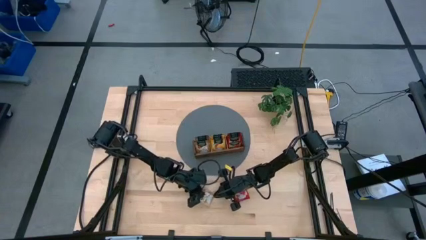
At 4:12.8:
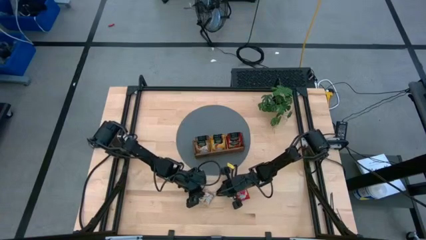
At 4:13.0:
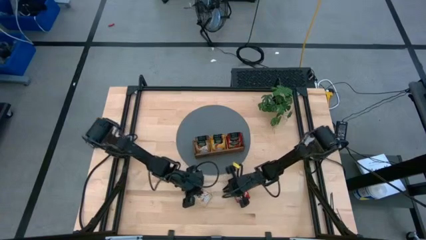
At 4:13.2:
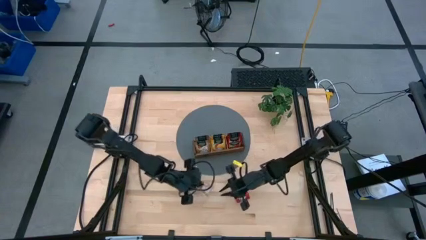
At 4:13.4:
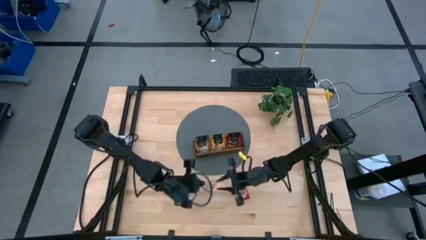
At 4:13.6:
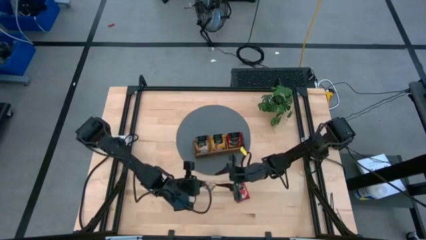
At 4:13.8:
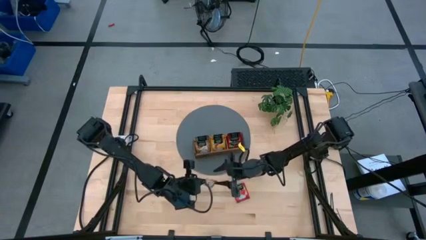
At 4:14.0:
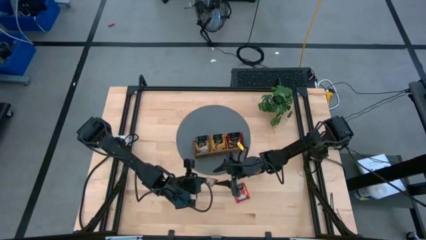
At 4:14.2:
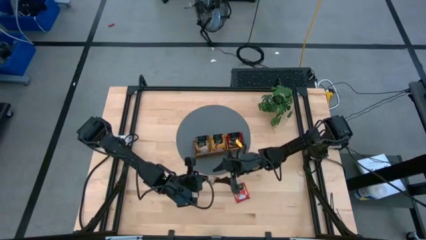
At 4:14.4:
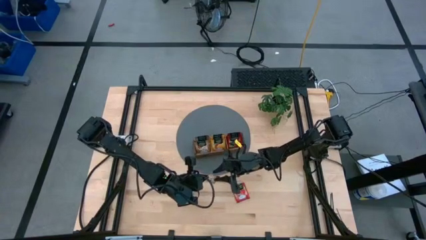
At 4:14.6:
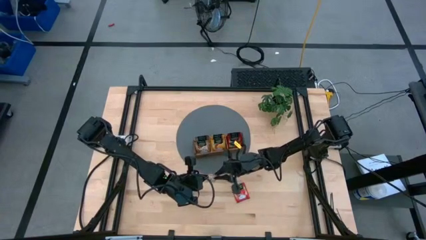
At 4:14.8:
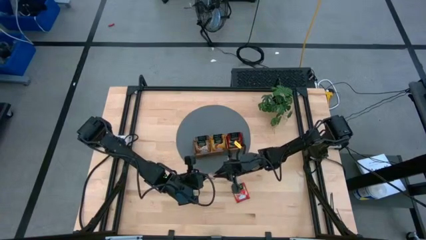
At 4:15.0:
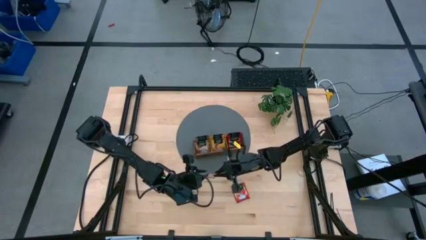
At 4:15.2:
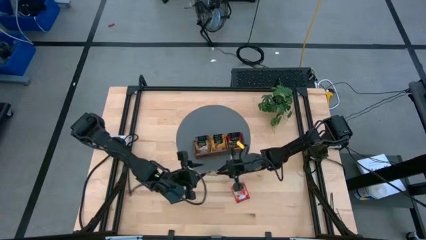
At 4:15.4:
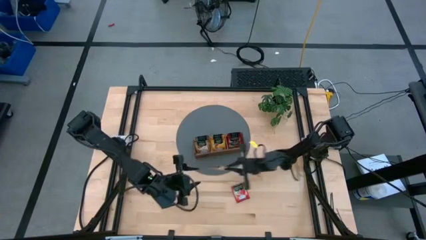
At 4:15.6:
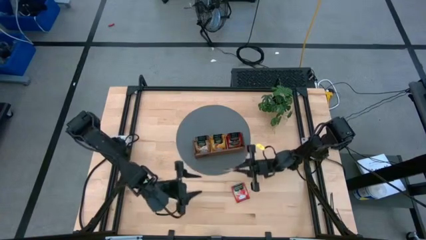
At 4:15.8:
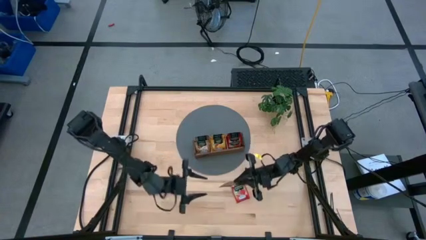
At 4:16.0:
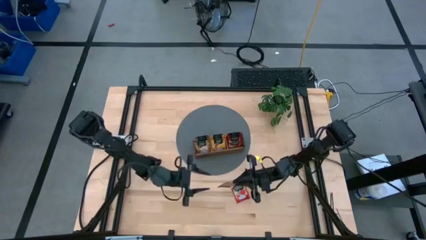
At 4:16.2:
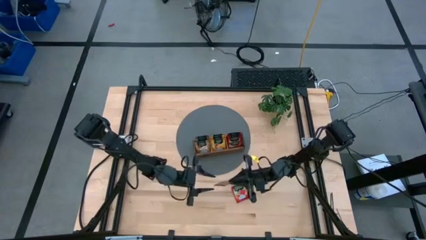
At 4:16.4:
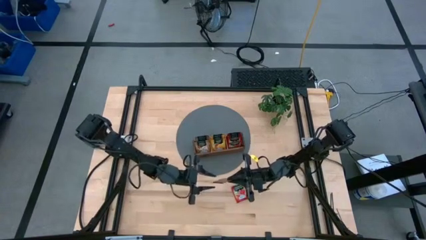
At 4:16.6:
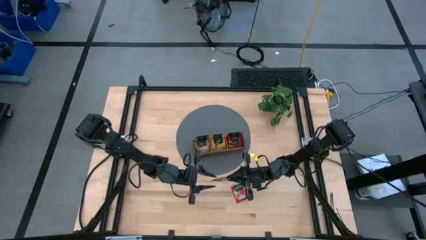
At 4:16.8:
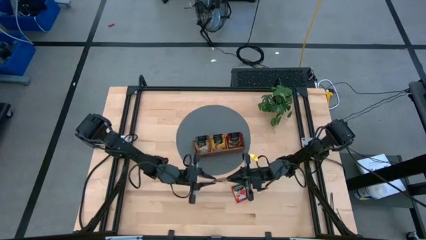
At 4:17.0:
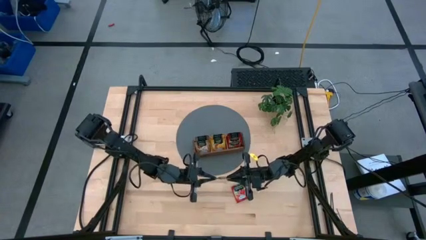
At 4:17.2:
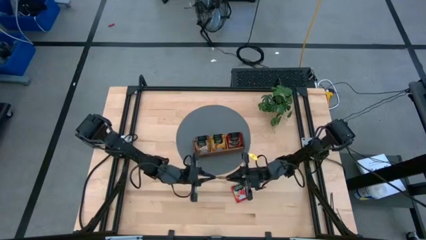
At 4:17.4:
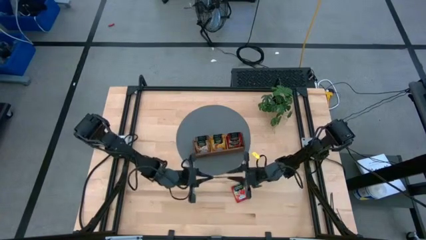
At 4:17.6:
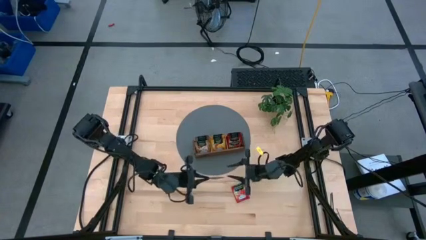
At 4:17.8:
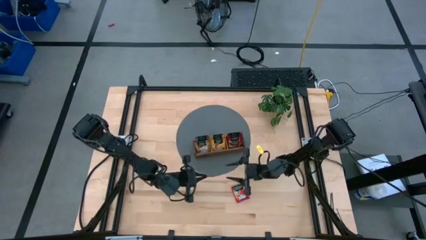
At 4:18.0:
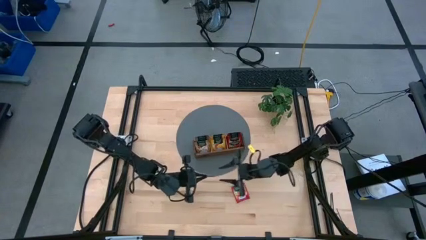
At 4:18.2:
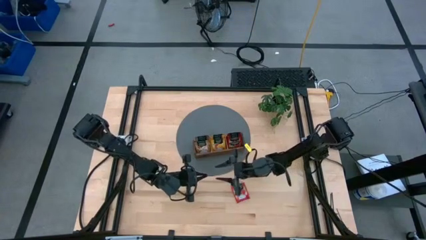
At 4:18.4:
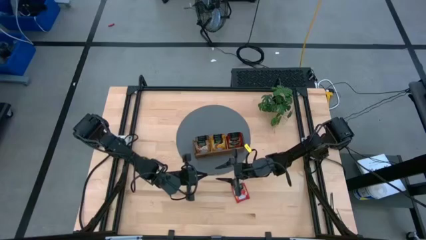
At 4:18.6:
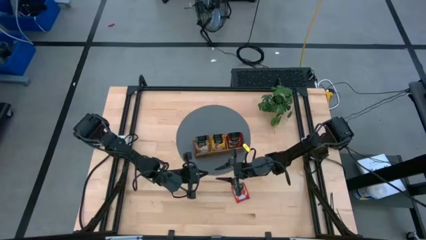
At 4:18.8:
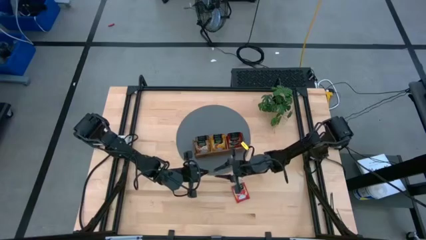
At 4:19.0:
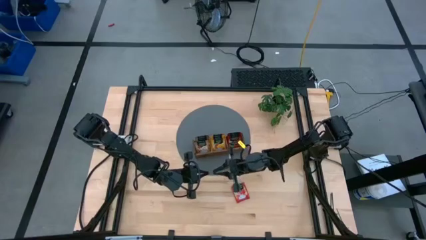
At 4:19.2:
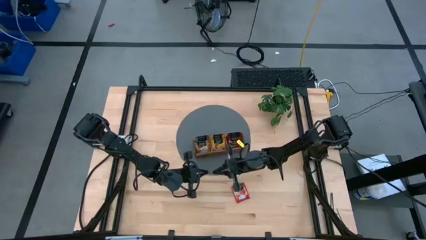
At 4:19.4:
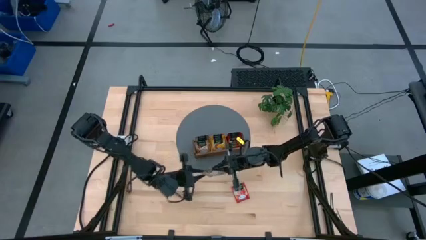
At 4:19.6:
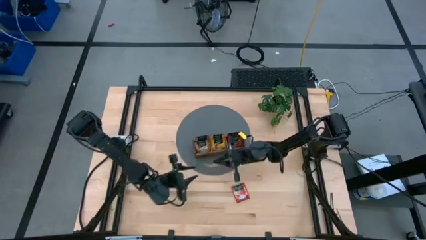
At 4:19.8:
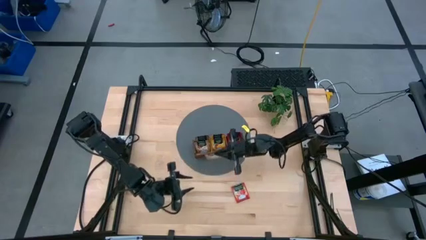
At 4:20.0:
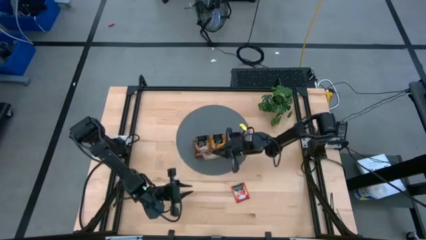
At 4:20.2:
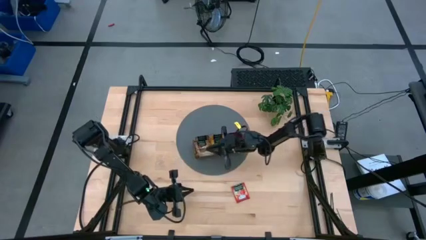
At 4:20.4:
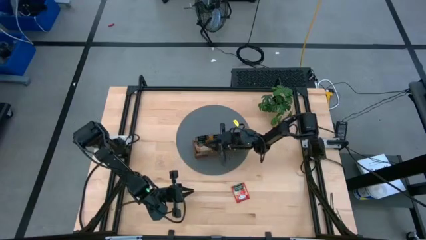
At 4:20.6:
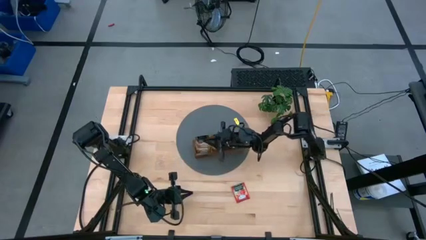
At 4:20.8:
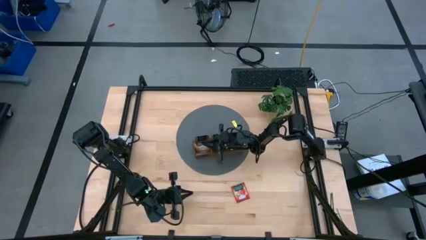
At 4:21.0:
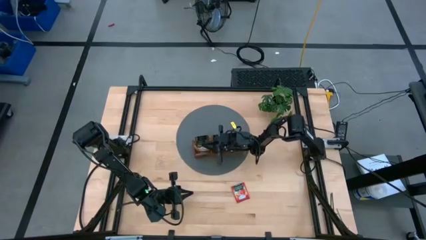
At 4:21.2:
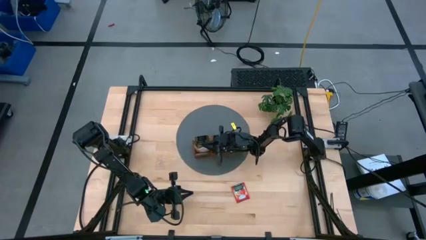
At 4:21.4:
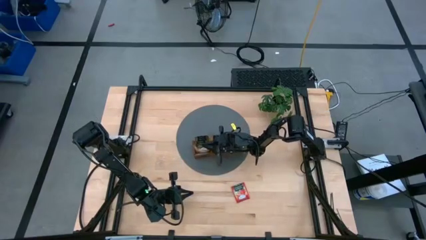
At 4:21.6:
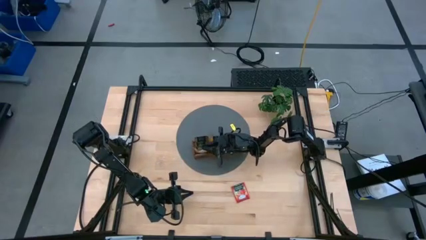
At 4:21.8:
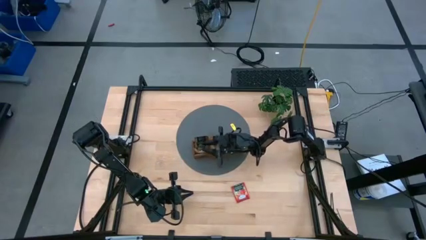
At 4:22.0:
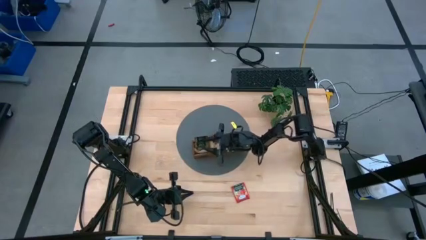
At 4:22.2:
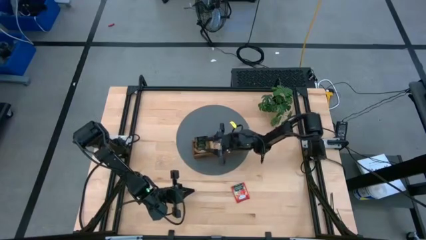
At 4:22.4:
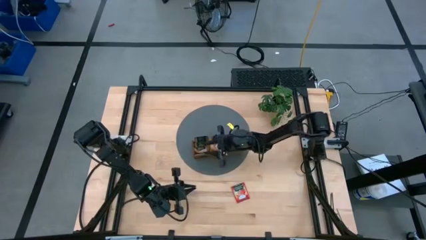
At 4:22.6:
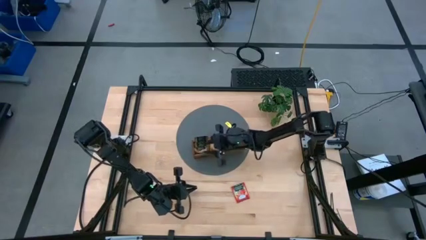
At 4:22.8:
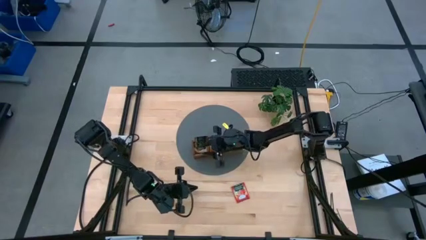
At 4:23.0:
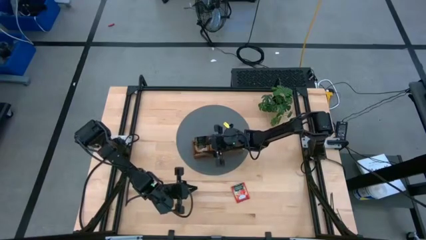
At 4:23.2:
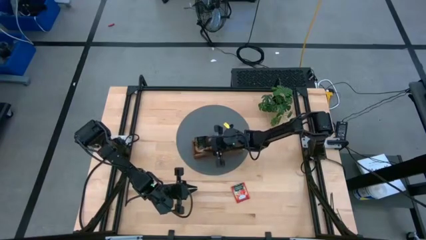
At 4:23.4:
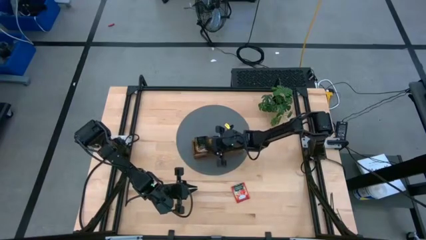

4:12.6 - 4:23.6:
Task: Pick & Place Tea
Put the brown tea bag into the left section of the wooden organizer

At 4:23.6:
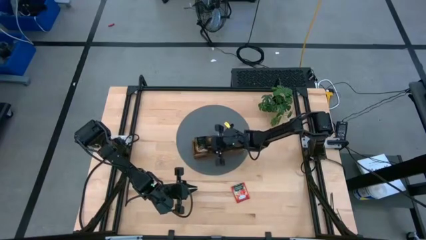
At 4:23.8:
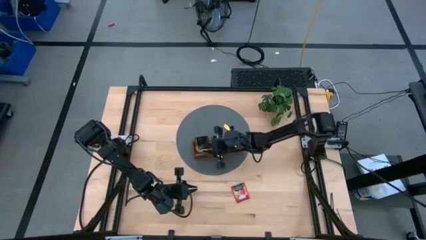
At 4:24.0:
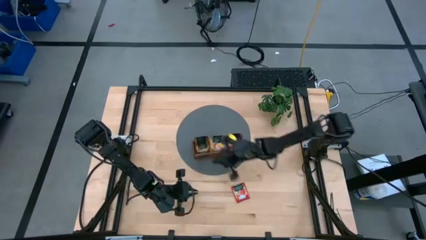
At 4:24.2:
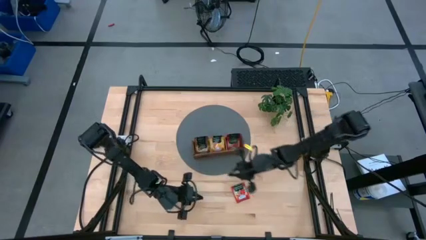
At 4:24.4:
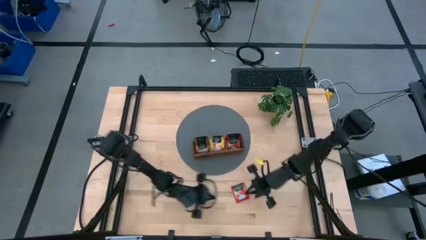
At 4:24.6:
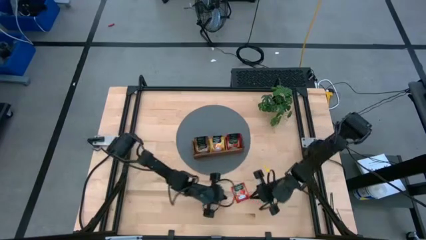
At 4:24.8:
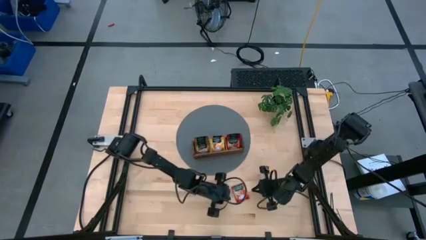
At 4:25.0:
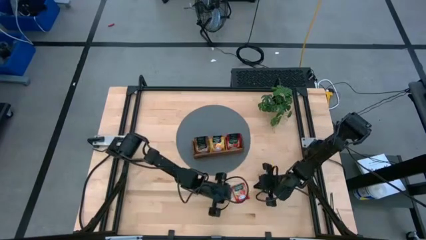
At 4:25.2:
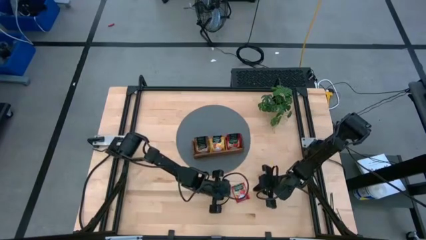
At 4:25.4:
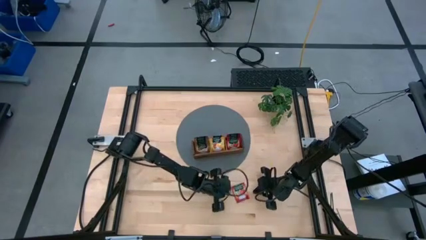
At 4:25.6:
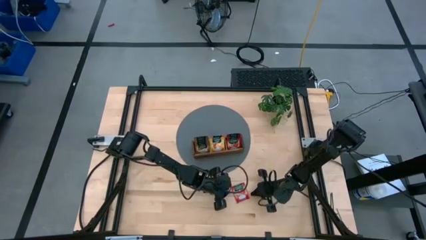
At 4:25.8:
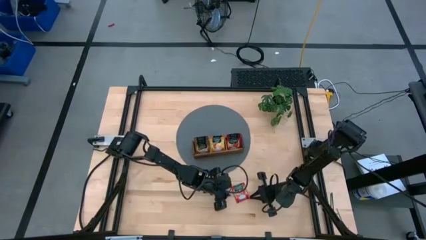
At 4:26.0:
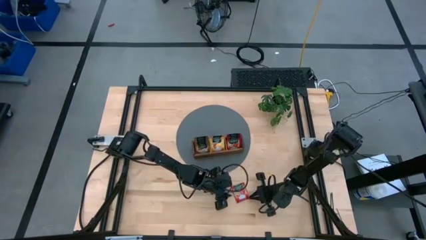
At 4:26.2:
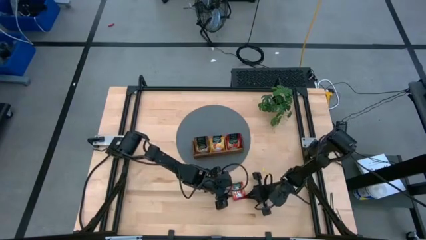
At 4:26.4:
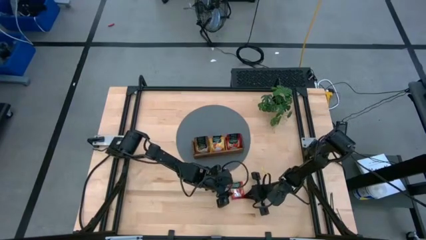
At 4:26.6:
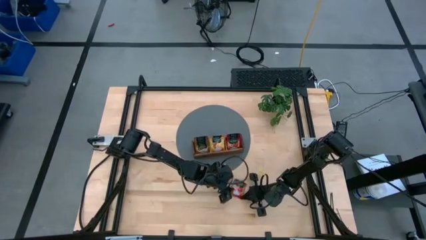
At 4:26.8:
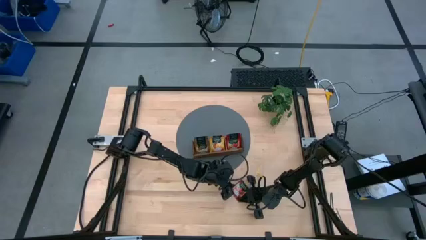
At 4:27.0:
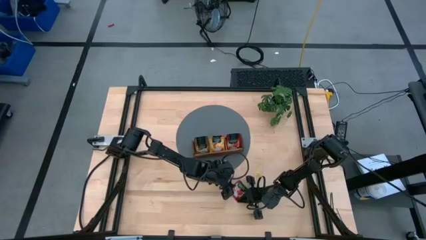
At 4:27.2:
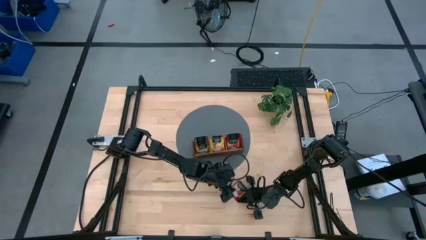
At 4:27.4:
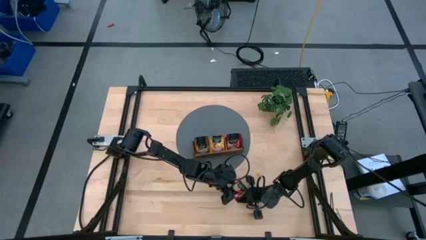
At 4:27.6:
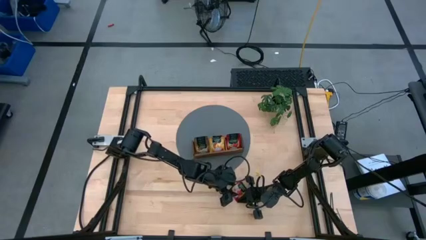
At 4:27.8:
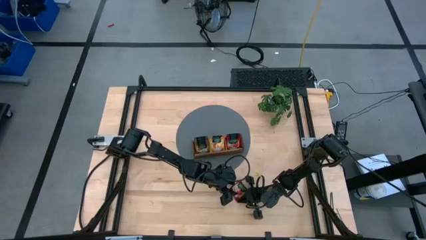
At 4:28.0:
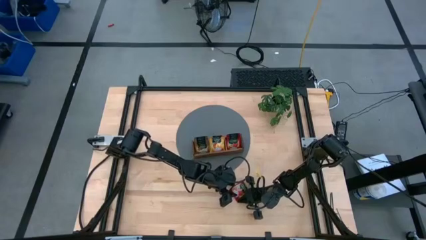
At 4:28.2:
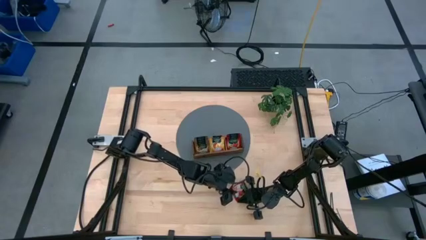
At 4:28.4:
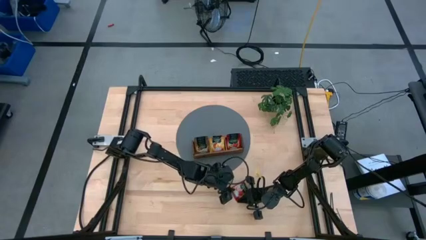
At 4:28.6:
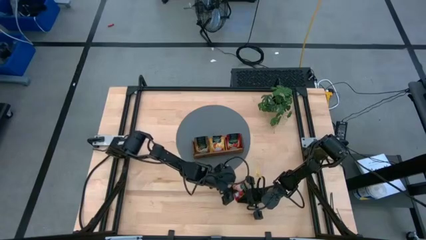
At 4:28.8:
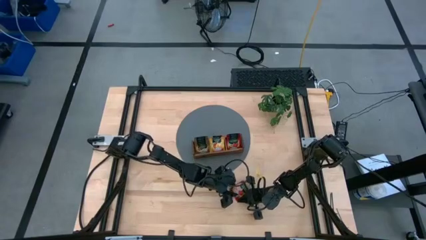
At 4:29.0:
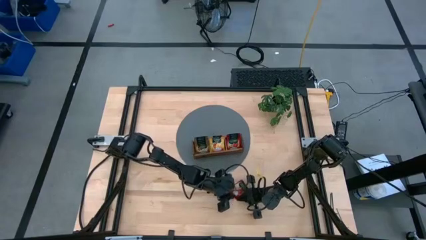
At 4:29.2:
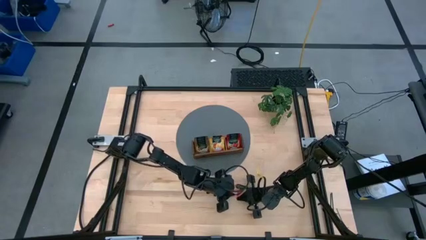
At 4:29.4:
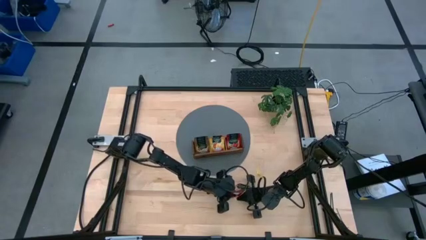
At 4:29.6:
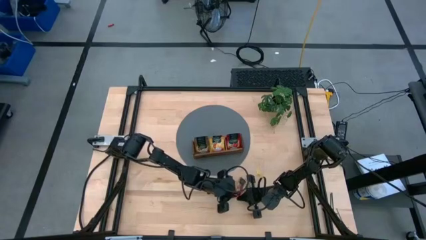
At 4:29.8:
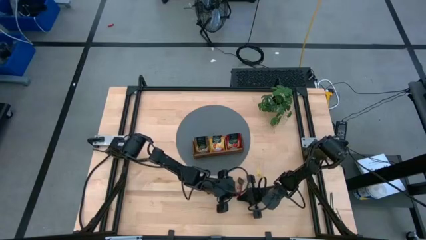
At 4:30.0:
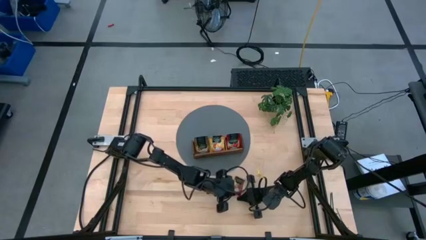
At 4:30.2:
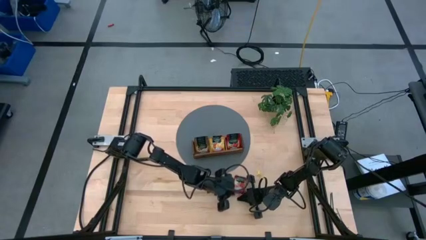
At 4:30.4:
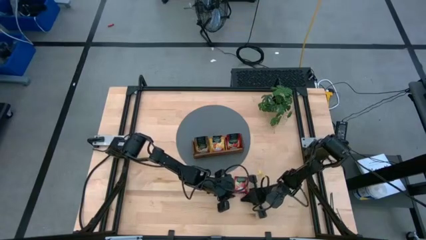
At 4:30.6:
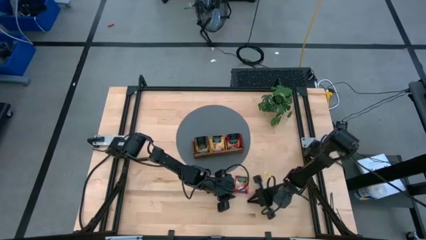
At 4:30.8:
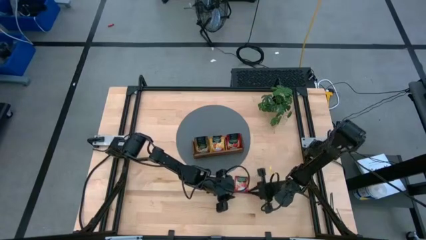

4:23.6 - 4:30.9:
Put the red tea bag into the right section of the wooden organizer
